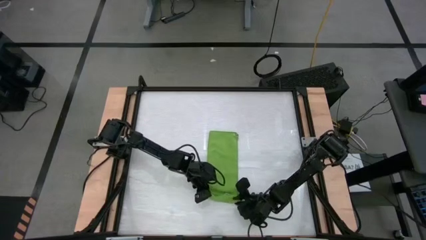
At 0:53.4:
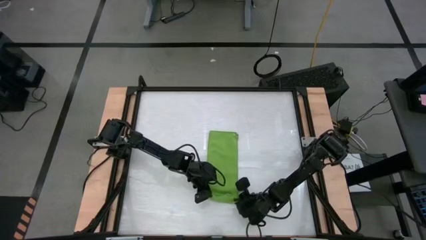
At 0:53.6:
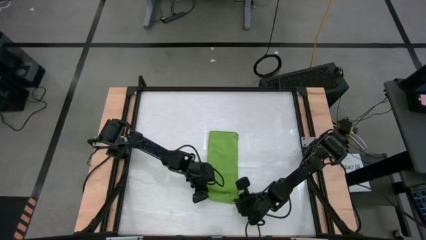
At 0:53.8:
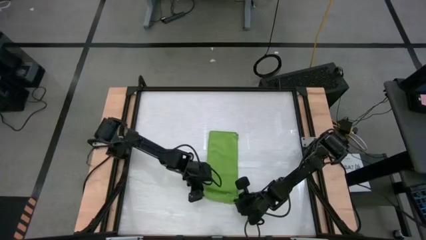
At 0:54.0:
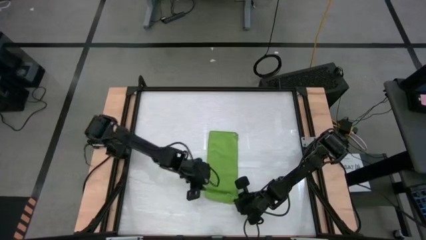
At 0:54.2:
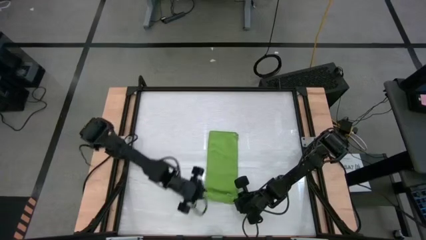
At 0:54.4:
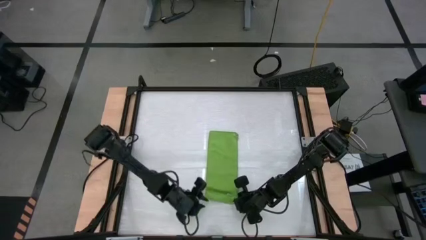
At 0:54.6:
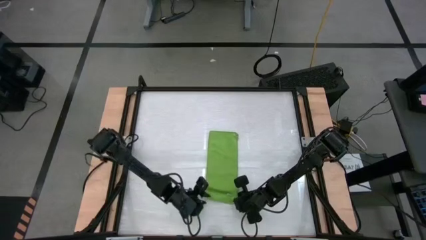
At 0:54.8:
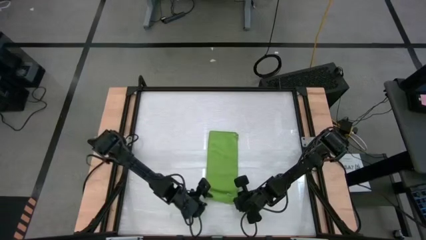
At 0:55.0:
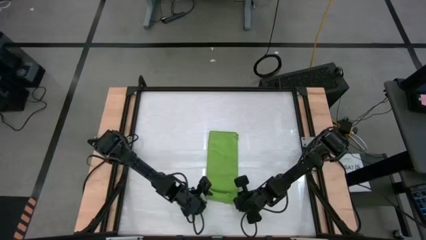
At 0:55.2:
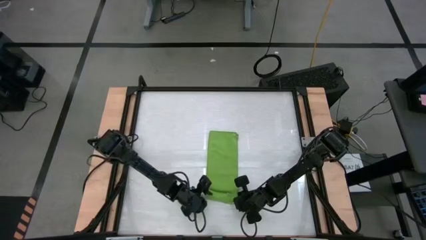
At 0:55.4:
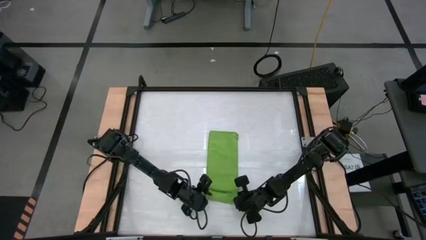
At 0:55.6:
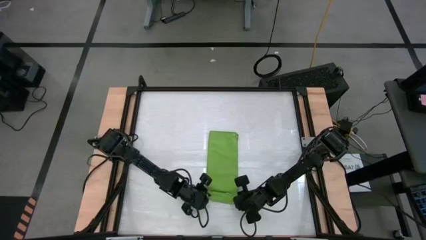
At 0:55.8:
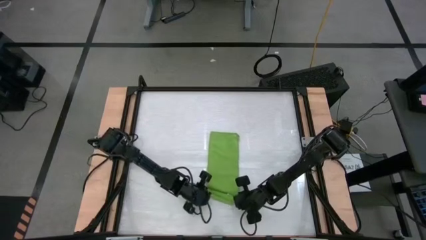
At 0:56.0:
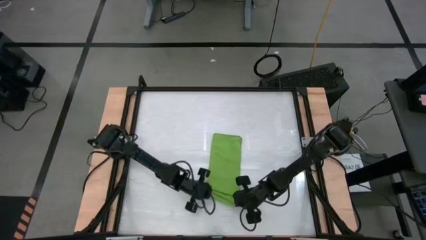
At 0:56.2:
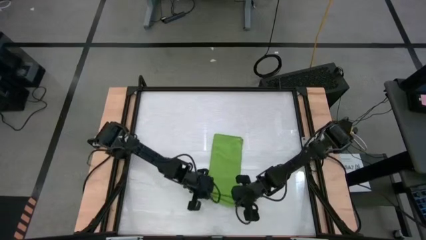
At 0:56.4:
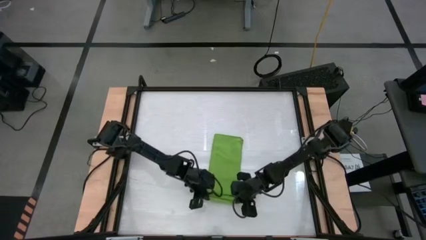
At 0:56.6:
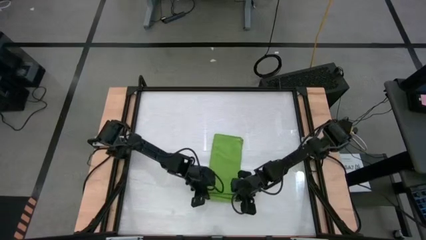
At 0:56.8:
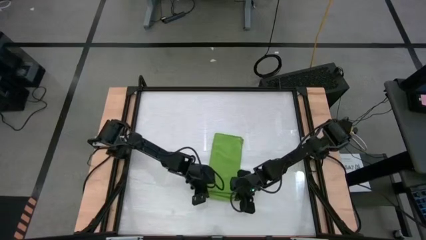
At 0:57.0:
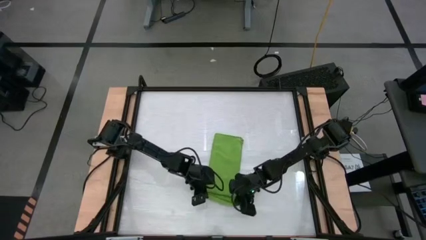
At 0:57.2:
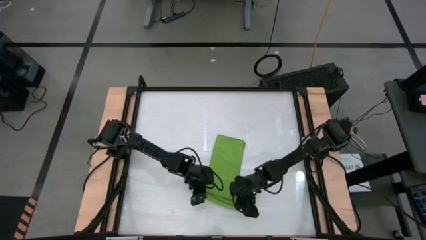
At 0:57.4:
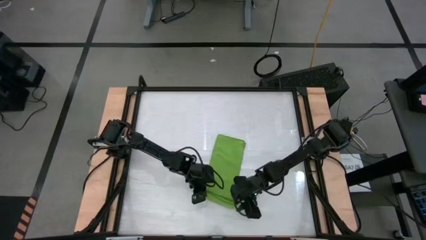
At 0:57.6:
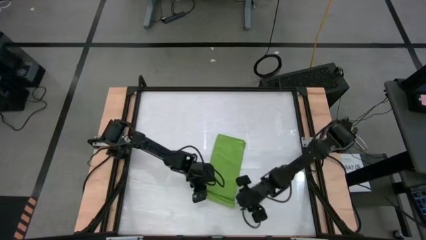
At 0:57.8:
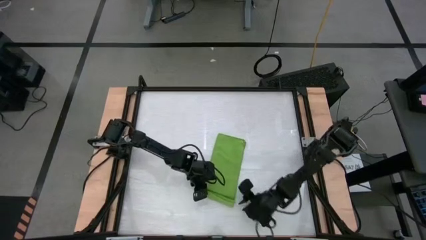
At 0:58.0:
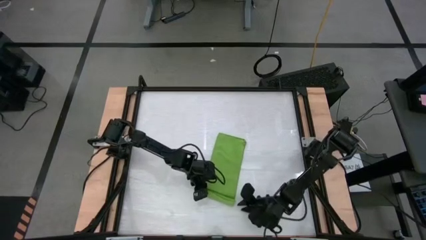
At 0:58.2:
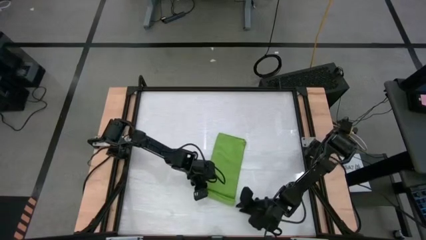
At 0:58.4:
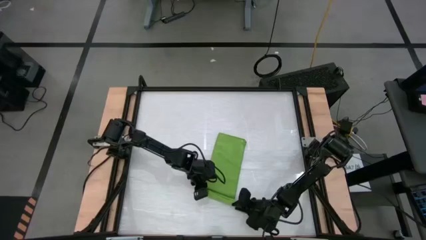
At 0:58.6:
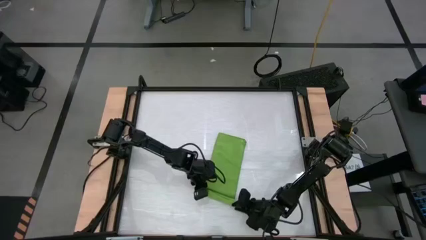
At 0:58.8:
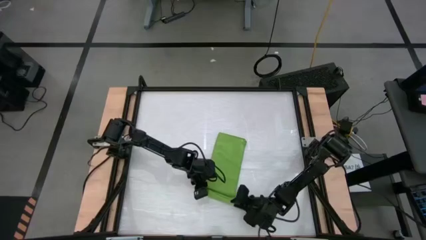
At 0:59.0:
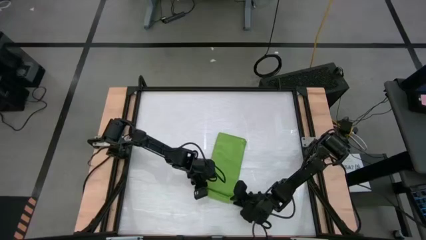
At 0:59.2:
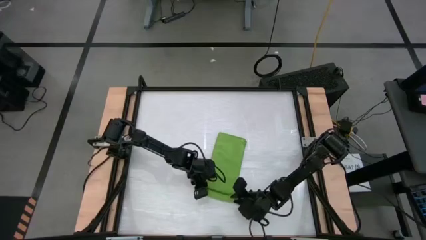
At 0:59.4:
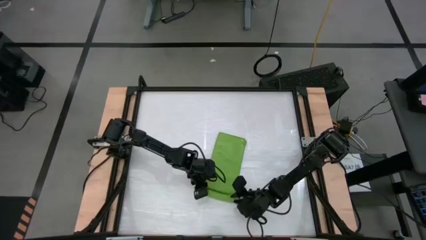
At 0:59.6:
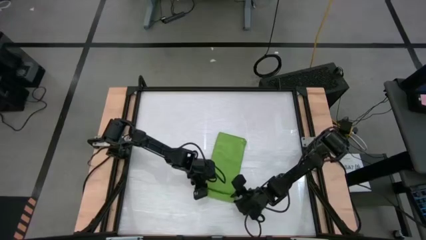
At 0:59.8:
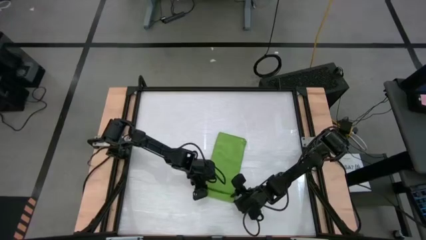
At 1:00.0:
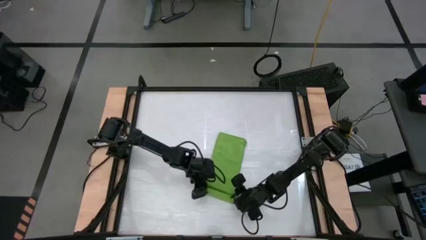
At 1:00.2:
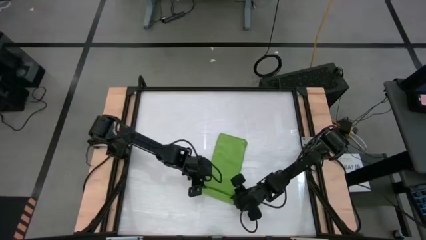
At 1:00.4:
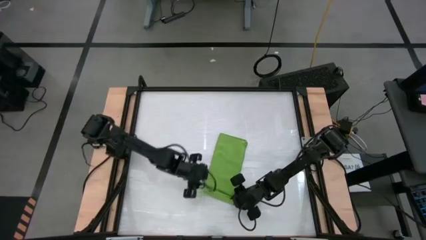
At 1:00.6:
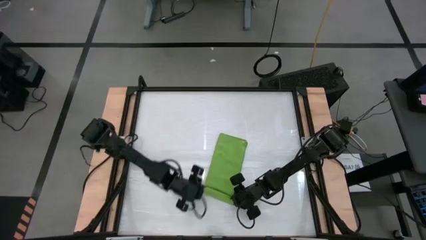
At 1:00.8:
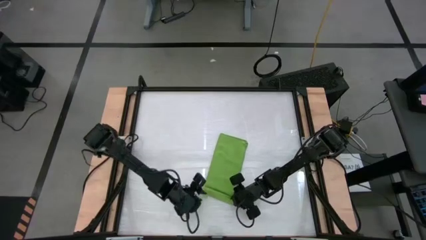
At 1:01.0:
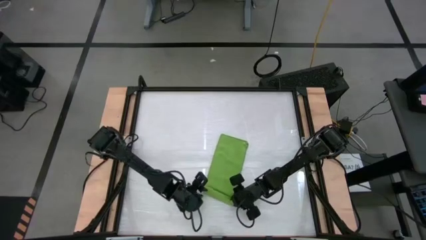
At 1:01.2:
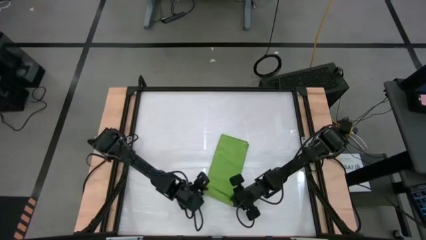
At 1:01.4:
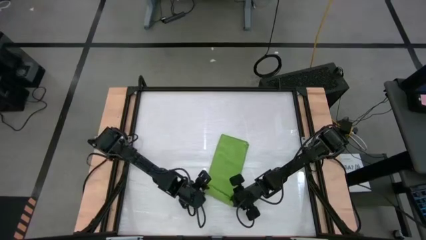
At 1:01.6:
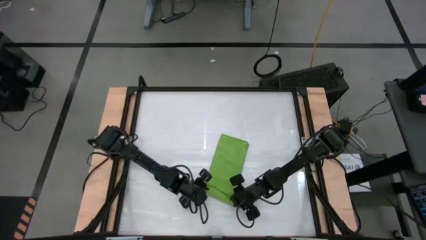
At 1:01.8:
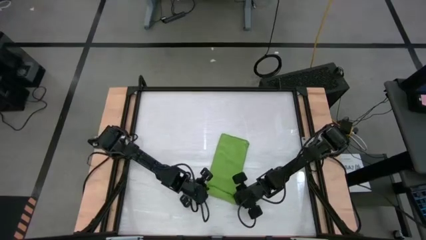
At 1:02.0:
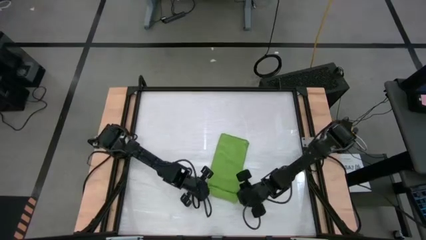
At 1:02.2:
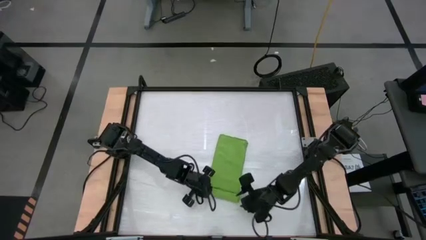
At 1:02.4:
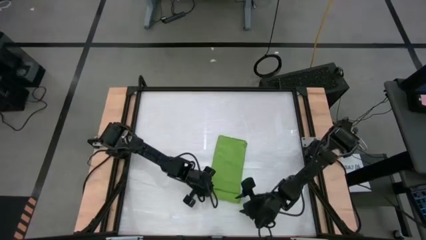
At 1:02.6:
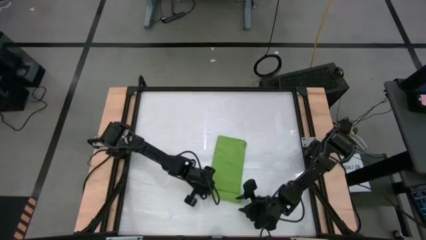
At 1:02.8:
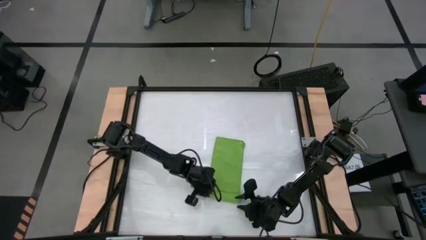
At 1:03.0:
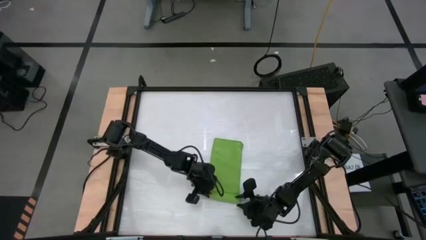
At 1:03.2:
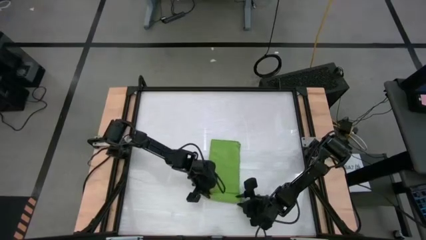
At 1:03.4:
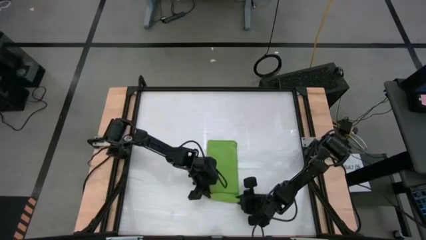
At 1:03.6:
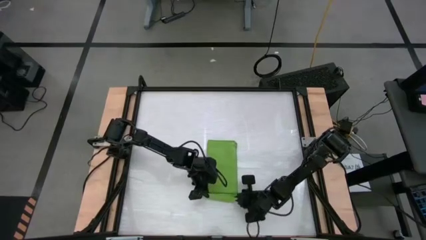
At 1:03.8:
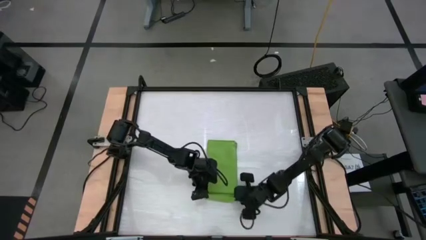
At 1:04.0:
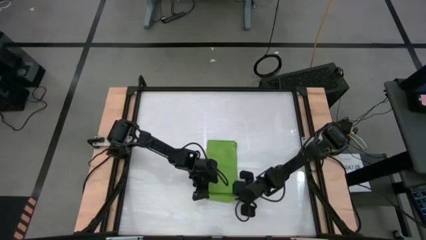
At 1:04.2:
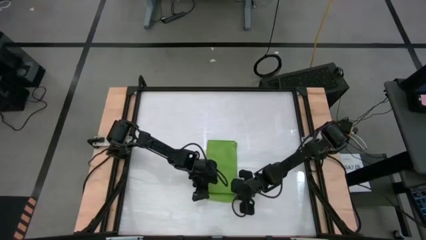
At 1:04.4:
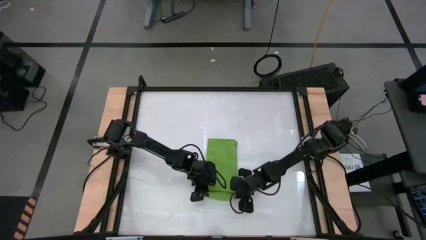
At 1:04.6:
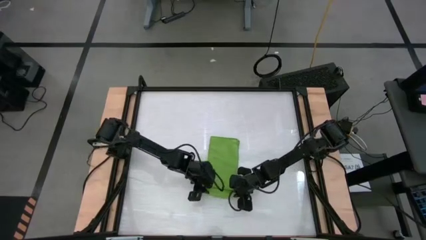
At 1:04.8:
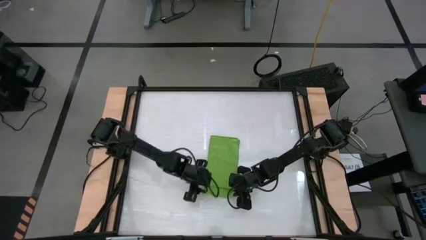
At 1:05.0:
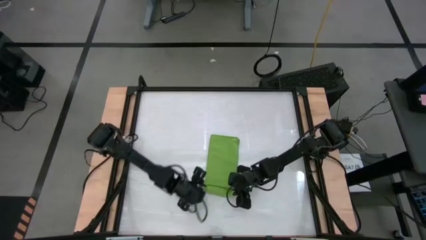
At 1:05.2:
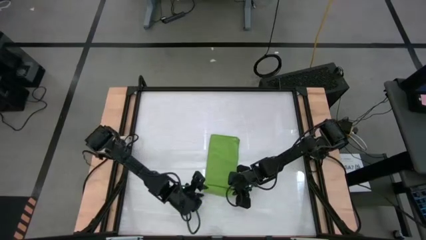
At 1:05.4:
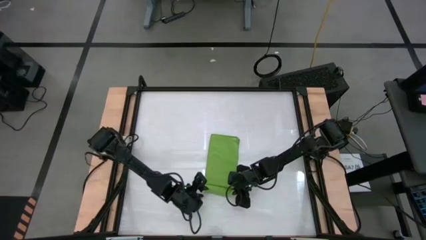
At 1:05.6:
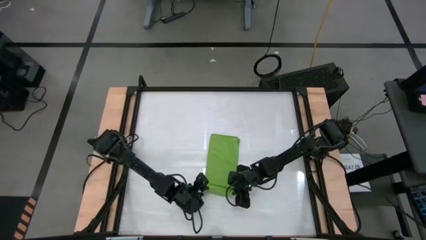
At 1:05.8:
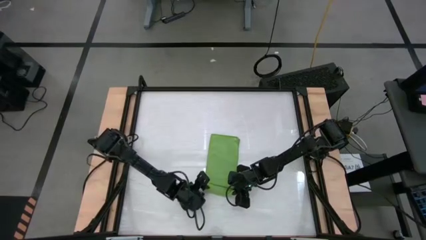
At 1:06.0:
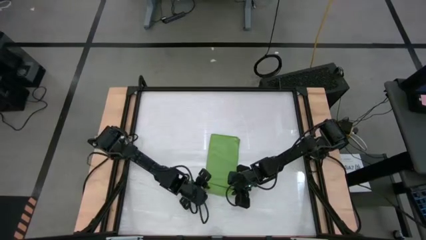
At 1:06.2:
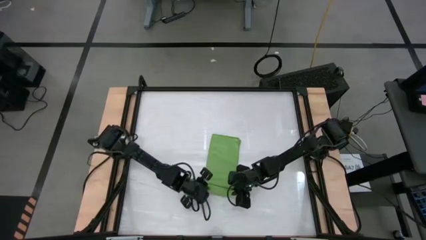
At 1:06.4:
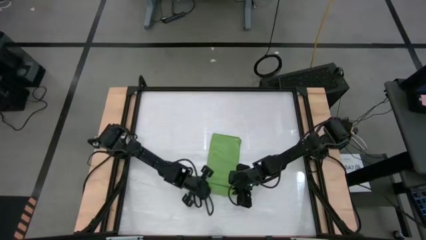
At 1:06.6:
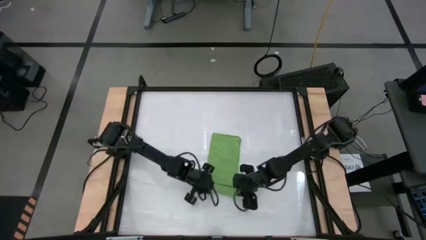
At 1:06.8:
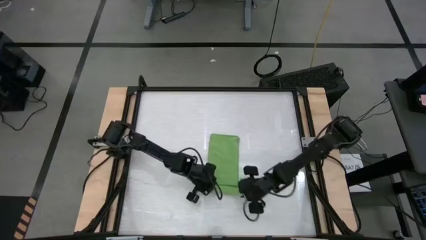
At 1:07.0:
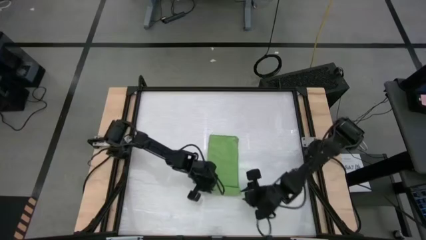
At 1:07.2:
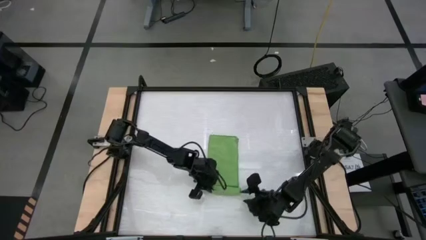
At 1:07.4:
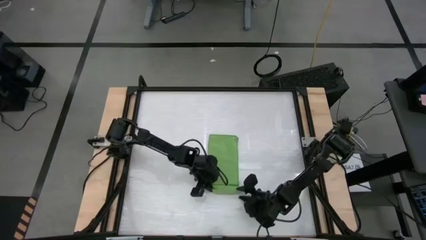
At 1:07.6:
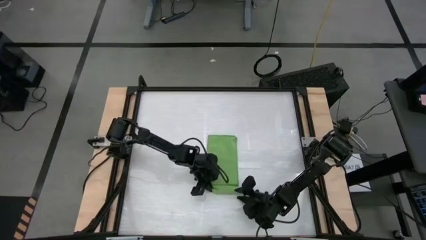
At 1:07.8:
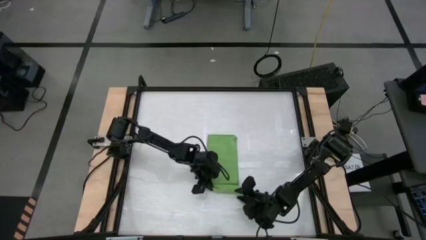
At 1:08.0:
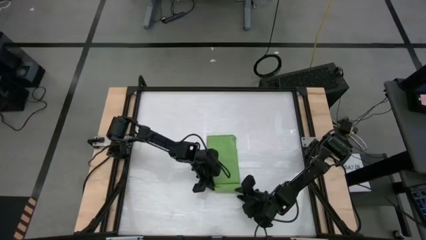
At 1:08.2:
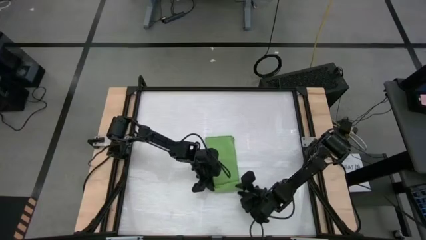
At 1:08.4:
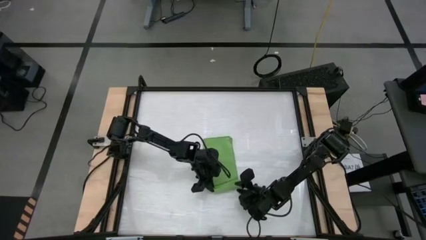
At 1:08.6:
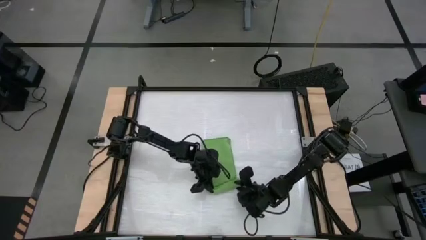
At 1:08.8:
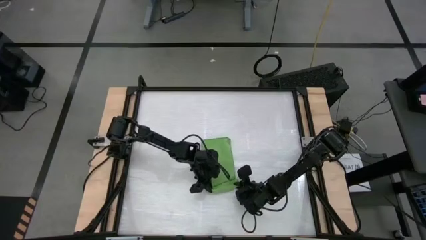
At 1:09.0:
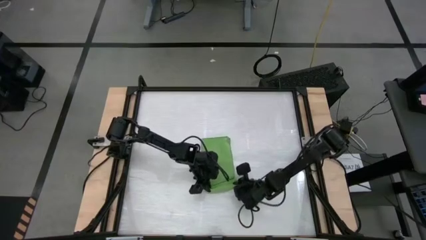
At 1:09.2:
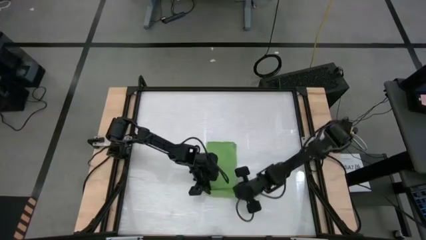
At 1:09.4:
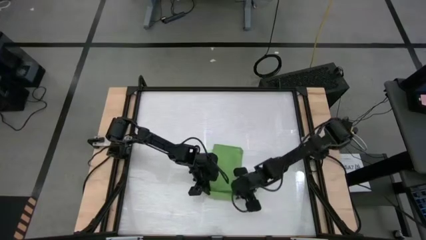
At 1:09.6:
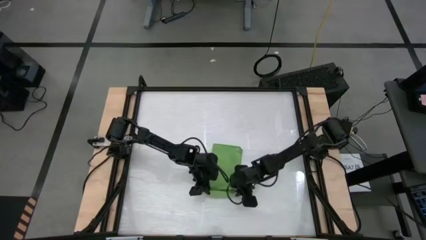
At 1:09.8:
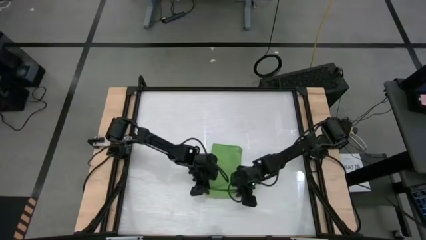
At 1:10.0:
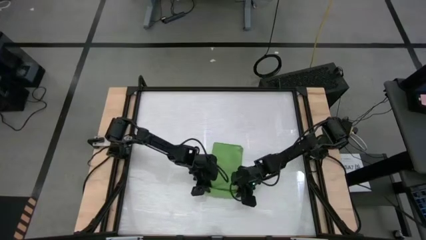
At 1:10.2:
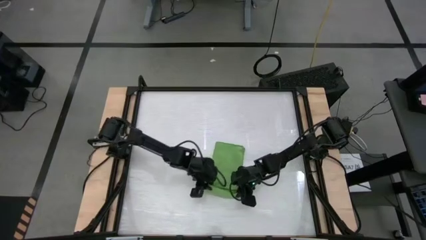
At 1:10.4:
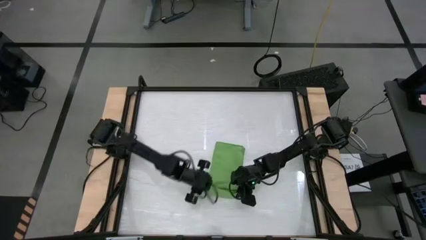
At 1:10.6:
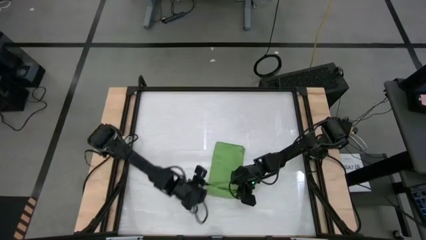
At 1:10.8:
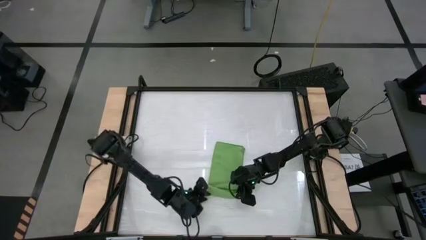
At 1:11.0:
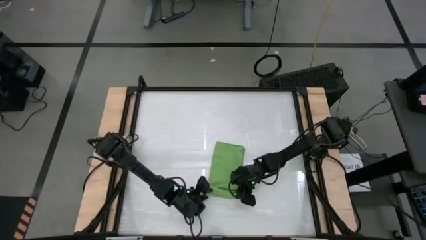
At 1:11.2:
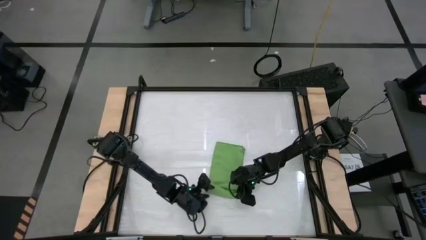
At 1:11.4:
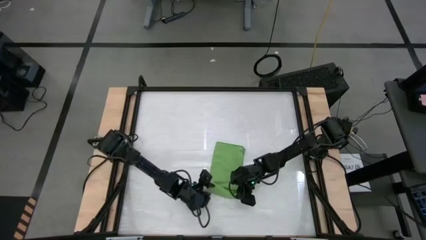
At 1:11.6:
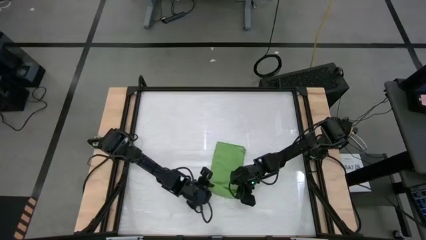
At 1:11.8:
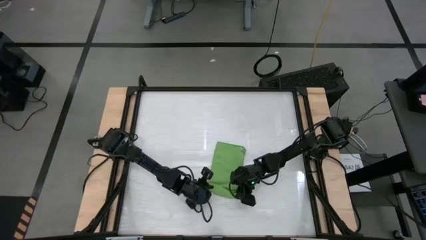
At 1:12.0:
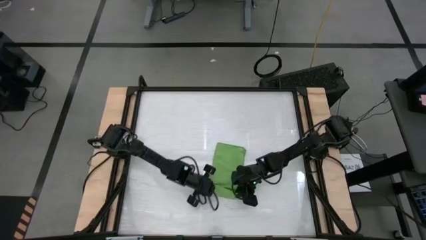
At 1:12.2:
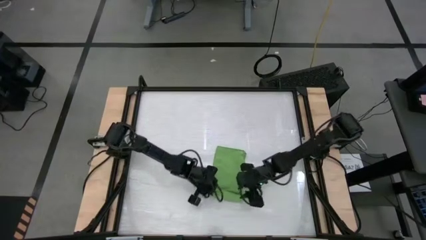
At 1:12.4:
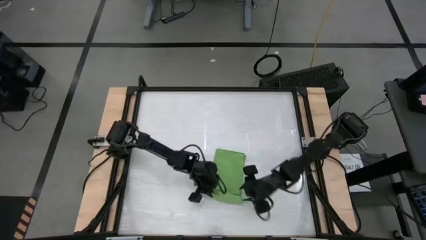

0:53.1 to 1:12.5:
Task: Roll towel into tight, uniform cylinder
Roll the green microfiber towel
